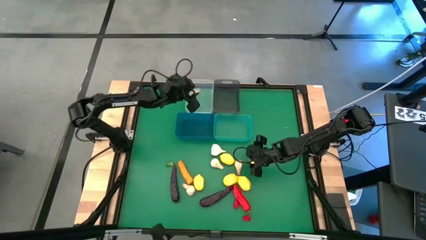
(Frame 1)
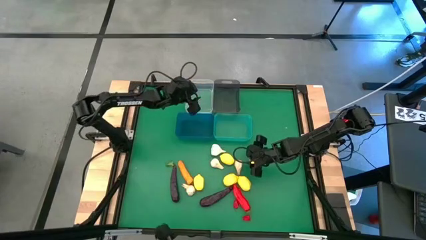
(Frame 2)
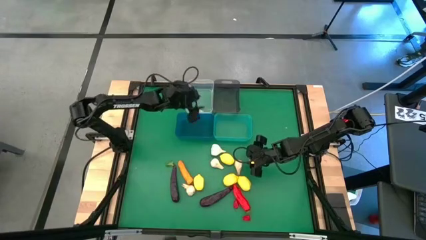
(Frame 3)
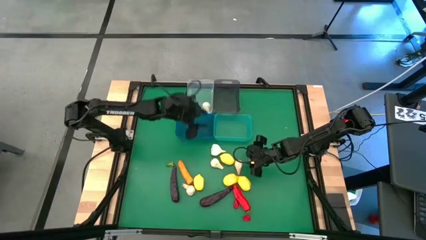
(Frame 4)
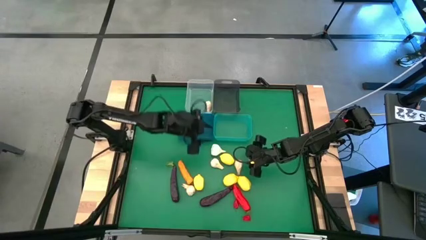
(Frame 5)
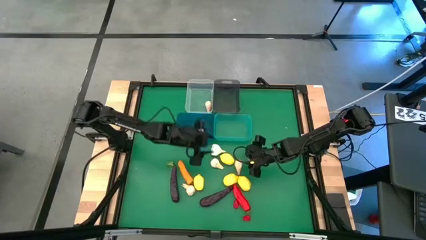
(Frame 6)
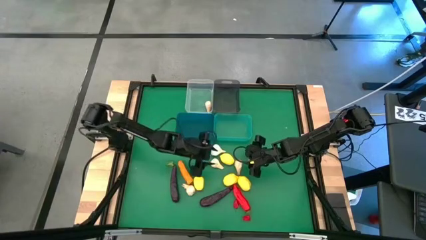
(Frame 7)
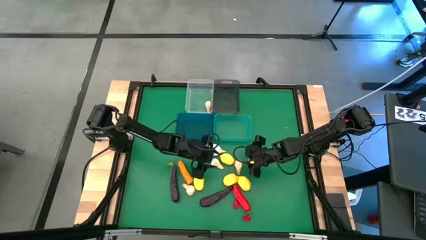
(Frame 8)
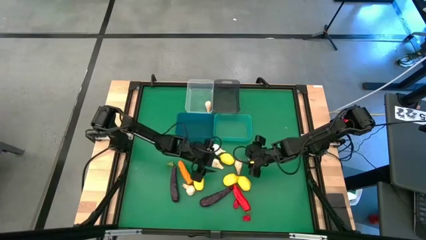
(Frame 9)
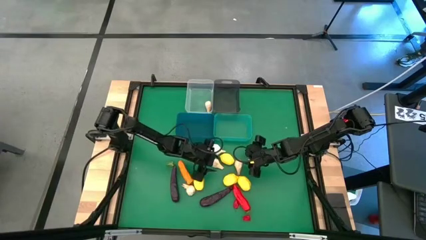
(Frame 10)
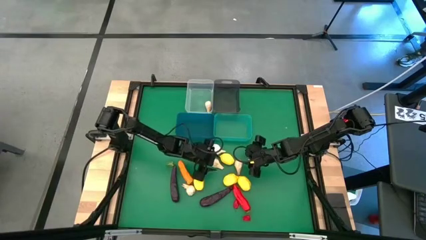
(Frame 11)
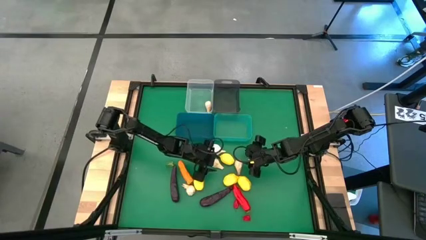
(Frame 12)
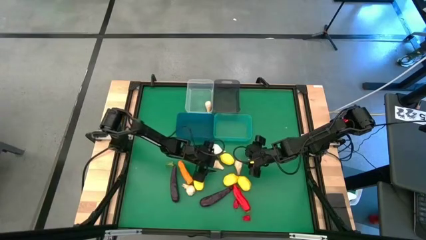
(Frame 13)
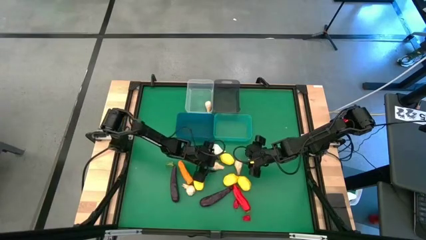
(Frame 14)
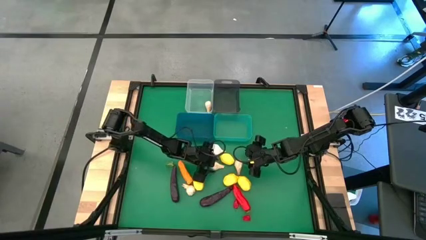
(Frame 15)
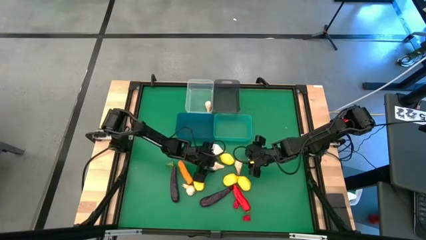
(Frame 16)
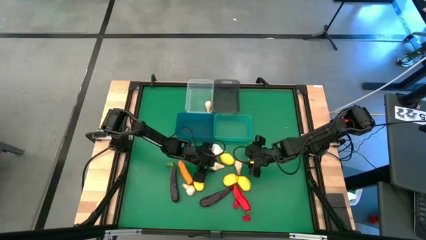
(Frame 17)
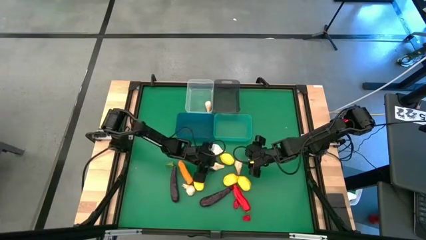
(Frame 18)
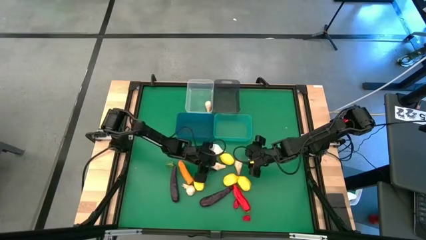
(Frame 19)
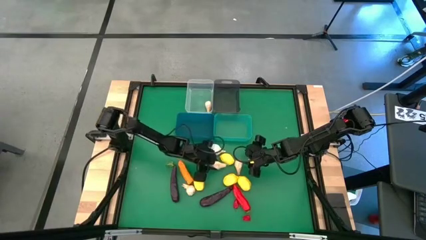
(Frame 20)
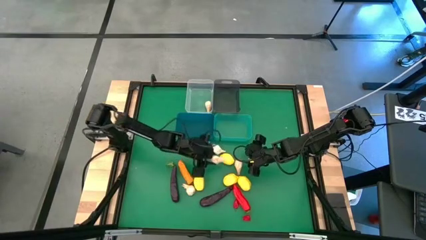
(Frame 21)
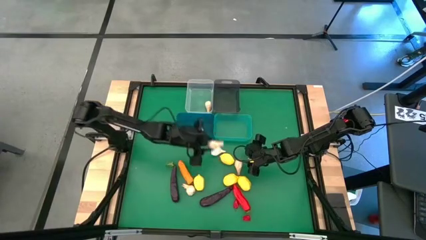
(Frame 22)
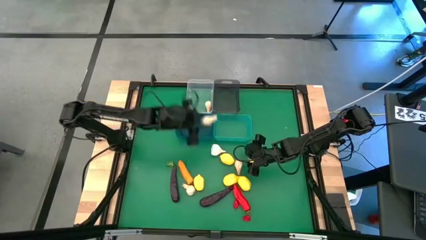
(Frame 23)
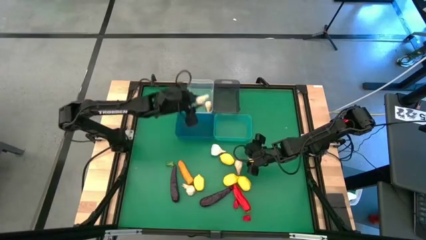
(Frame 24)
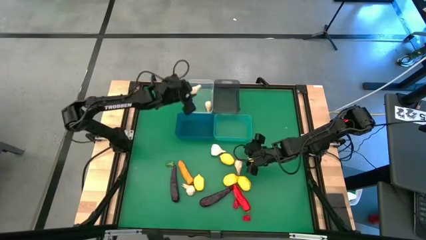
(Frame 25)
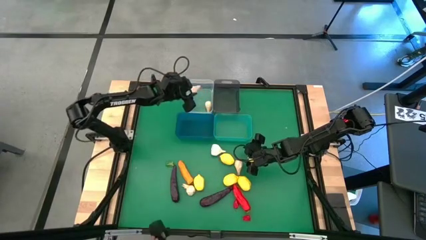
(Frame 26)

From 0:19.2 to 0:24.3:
Task: Sort produce into baskets
Put the white garlic into the transparent bin

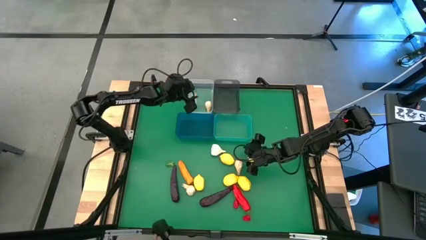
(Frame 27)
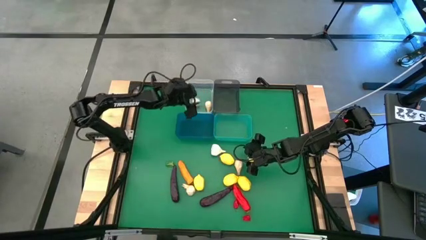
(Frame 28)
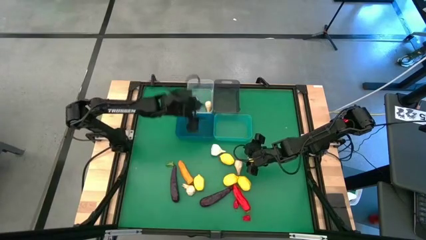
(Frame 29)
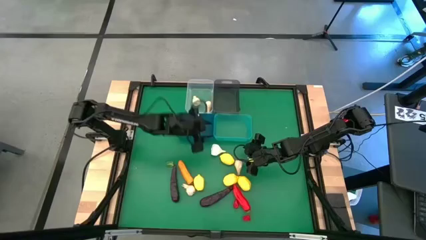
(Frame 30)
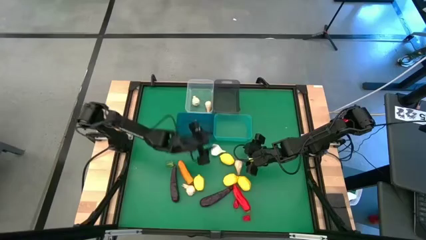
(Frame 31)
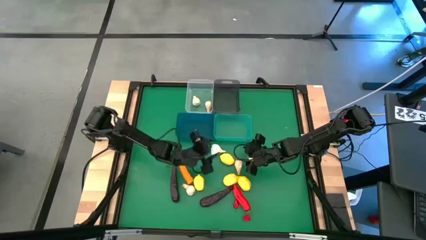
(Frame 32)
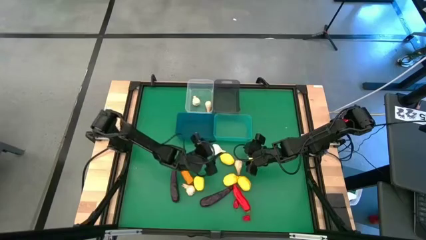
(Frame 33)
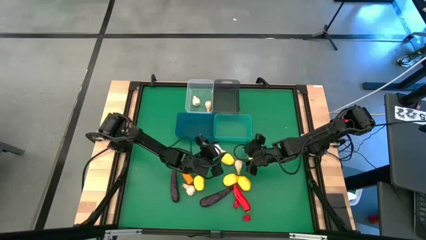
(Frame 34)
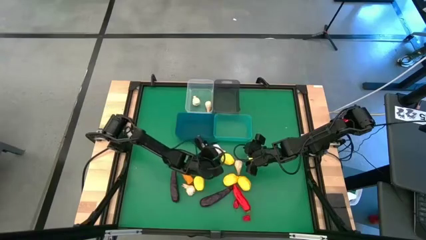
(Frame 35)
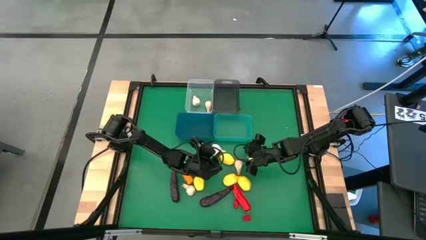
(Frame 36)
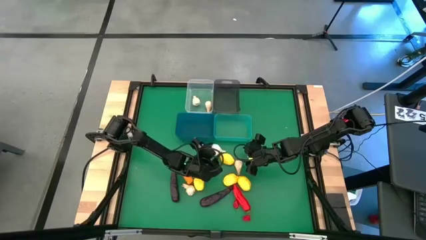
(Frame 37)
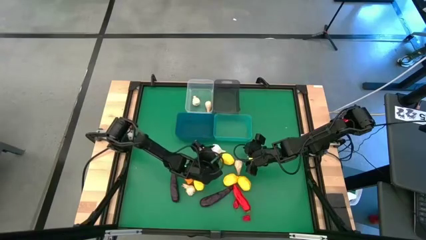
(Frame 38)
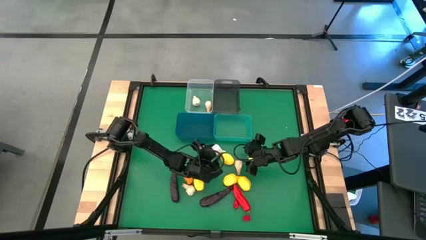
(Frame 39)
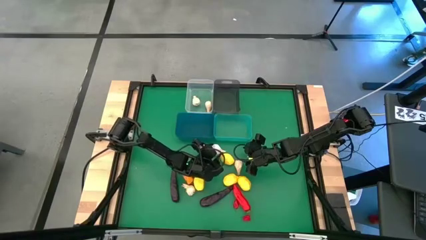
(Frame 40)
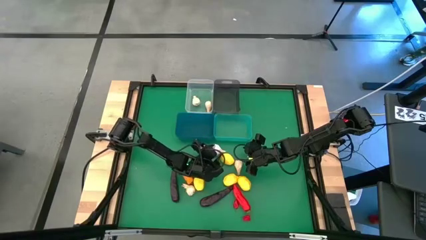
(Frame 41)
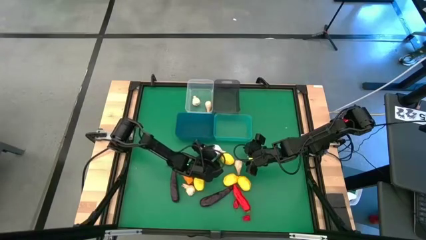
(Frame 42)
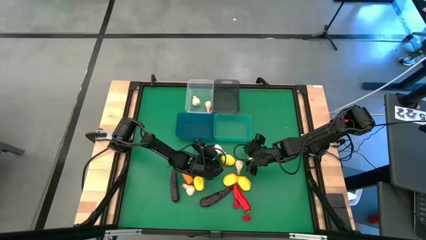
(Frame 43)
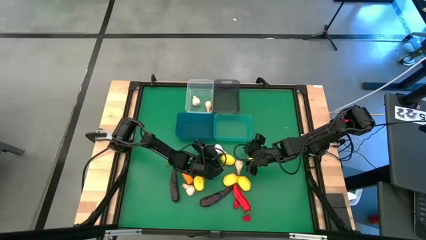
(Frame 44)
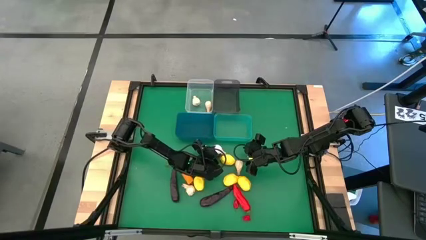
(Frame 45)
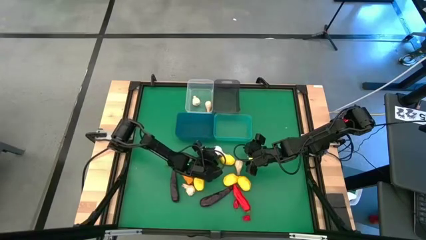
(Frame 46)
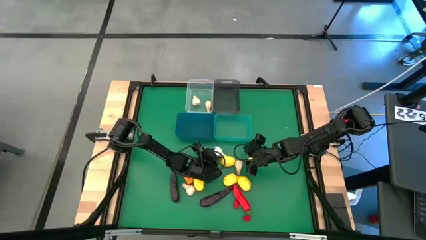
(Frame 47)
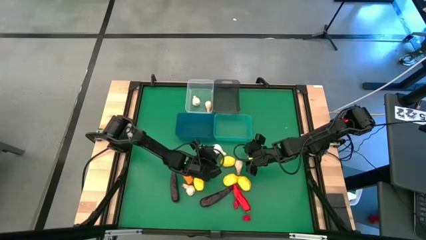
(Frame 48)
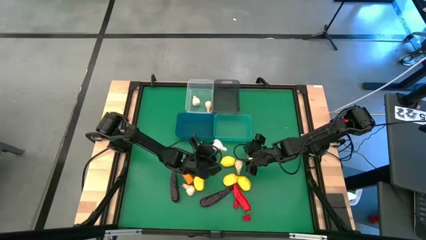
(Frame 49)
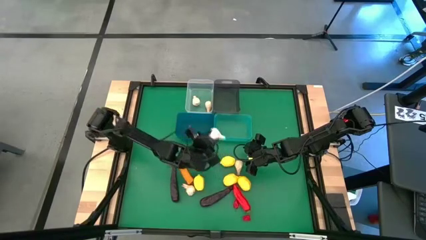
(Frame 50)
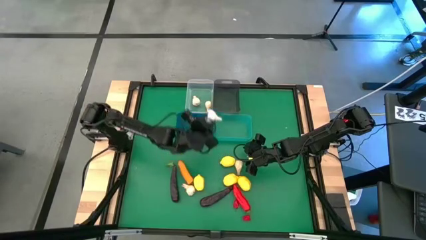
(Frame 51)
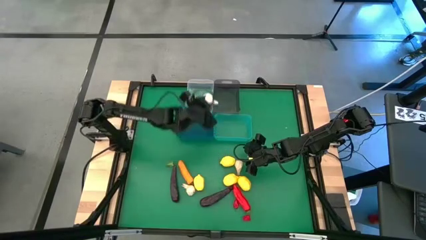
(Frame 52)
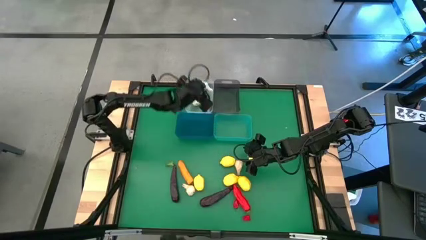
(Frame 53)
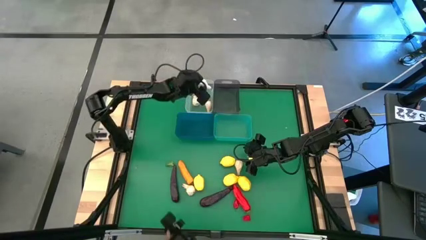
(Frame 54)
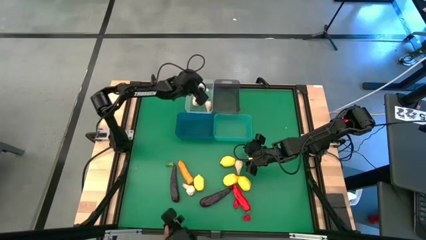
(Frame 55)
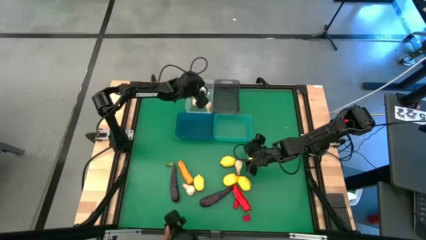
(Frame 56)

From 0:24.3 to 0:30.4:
Put the white garlic into the transparent bin

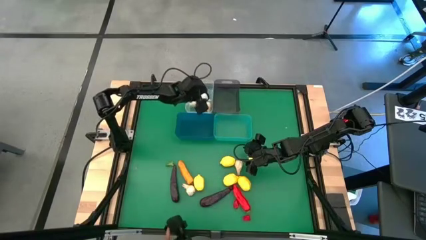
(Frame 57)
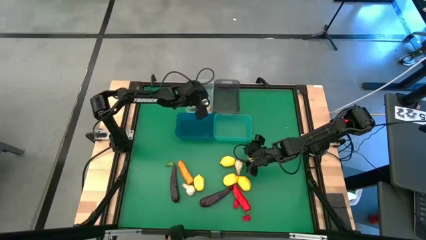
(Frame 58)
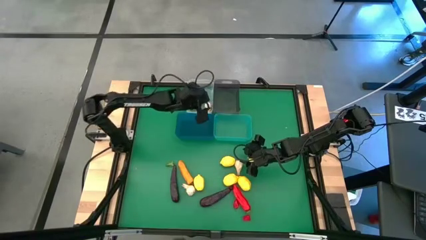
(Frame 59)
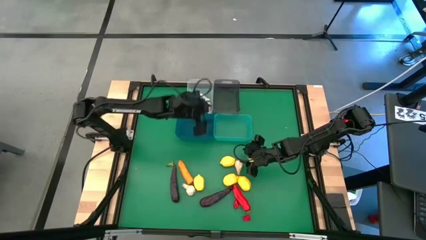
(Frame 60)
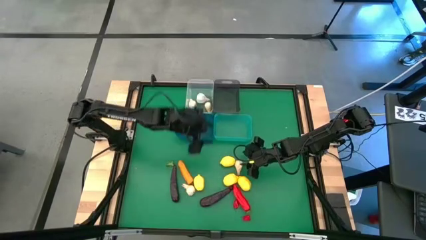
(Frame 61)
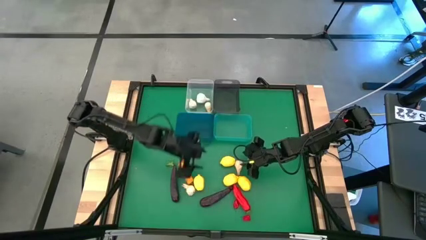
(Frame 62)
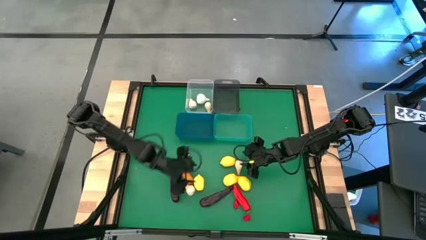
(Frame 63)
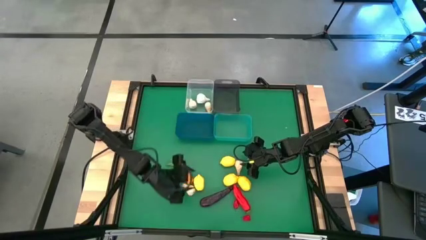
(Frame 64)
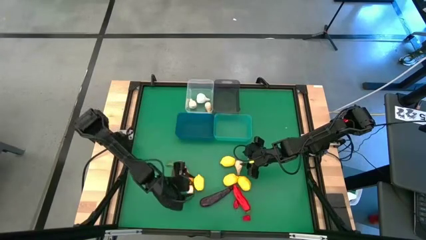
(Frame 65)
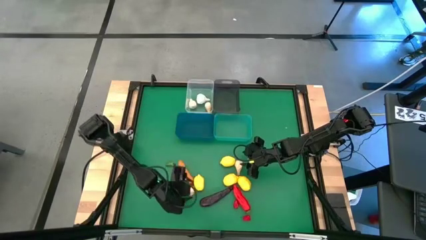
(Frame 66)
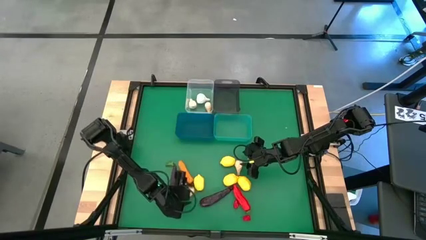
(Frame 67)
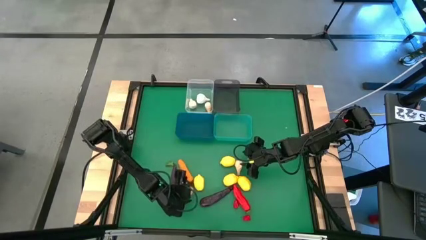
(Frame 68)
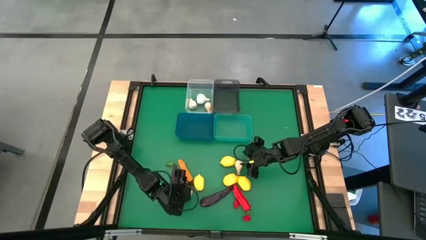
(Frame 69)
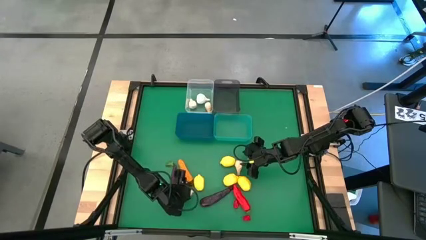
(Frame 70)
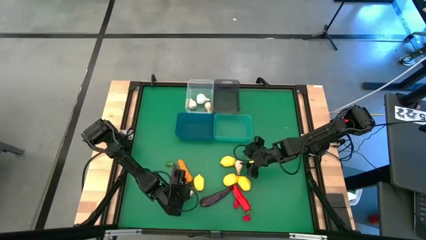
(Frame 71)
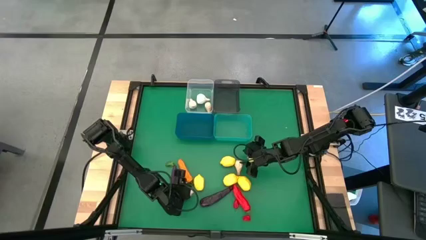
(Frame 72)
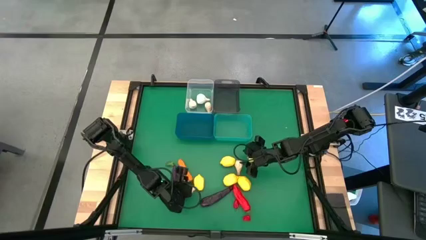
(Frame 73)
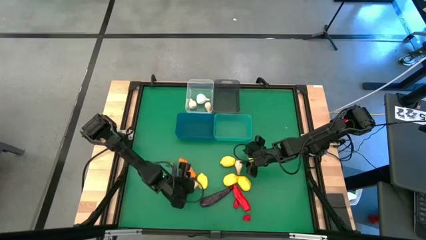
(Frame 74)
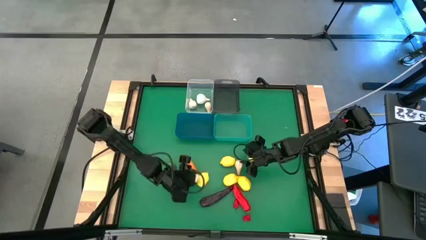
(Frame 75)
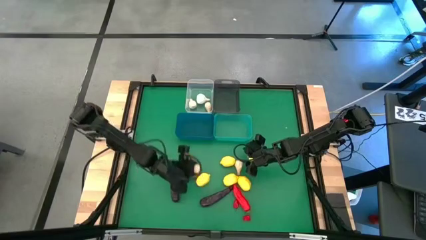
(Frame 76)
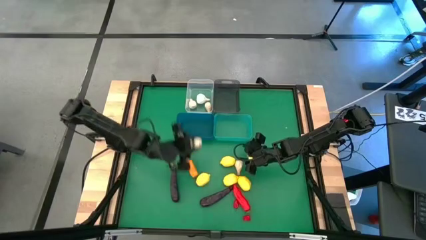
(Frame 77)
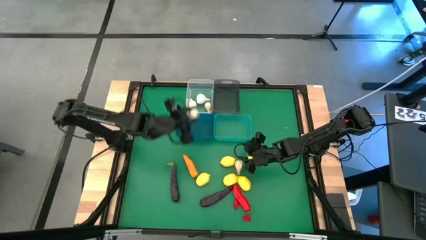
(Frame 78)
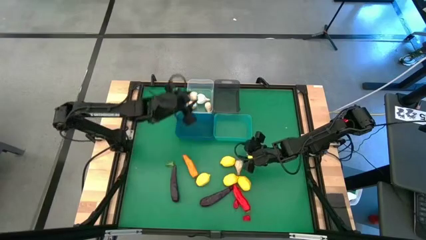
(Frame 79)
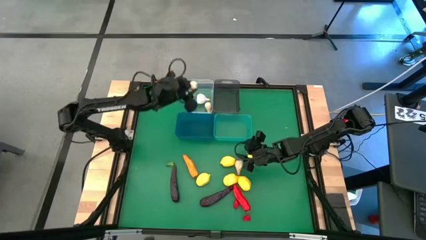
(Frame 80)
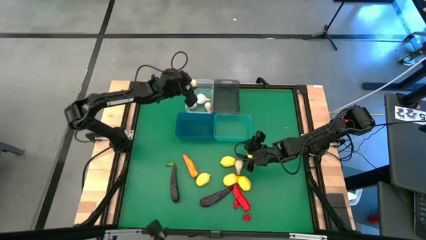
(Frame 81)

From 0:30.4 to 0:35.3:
Put the white garlic into the transparent bin

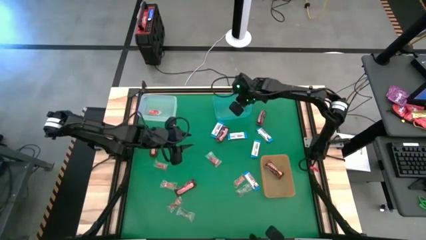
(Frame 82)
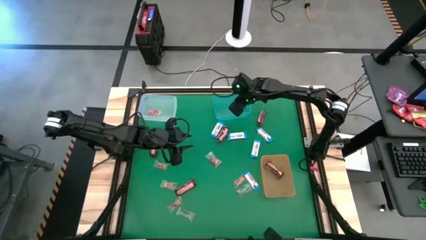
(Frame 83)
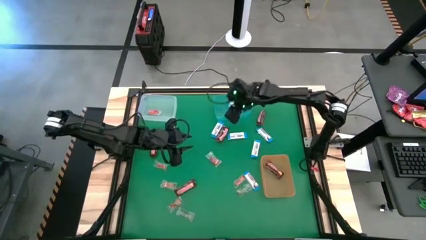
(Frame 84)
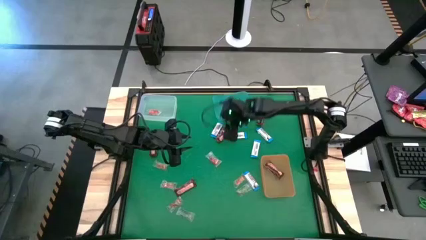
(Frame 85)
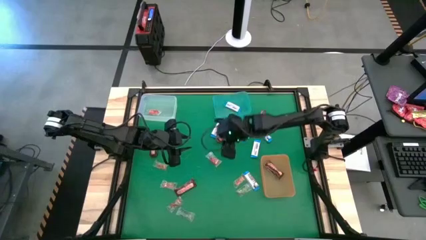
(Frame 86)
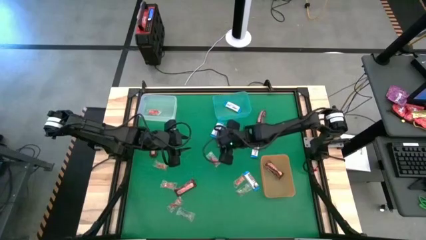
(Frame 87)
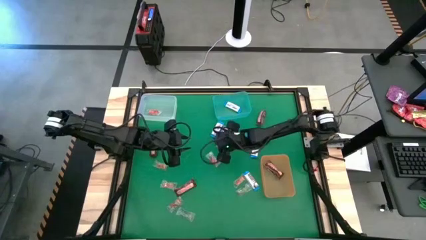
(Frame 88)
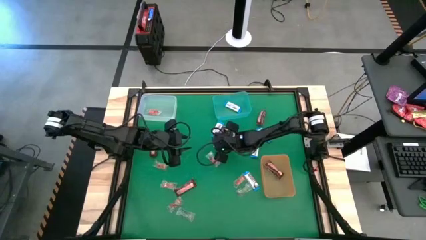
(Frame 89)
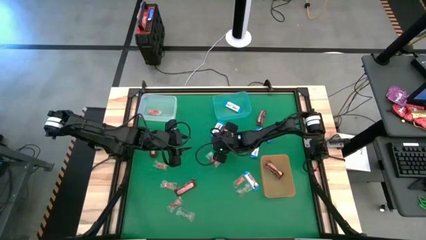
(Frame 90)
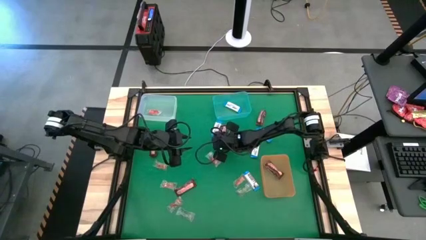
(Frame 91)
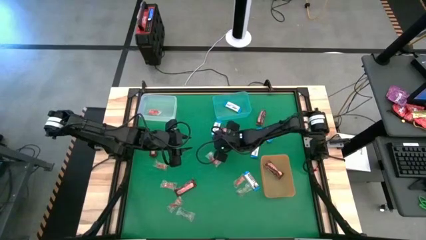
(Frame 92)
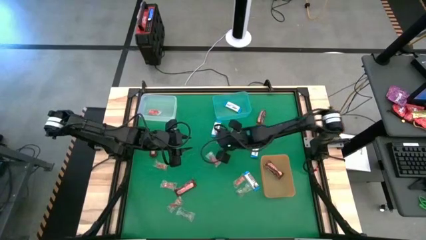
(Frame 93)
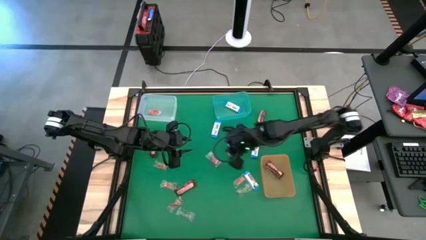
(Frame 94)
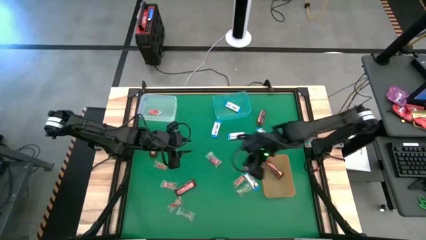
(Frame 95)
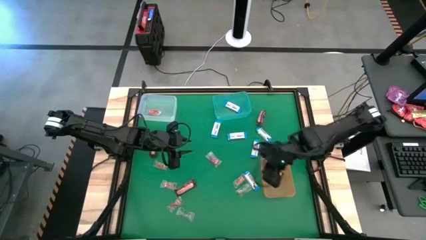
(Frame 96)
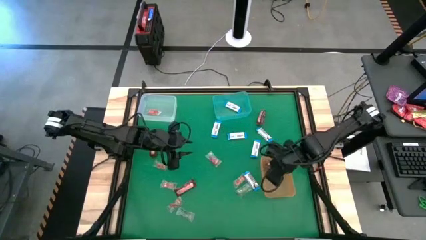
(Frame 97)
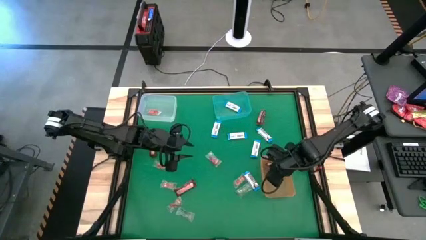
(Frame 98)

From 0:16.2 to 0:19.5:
Task: Sort candy by brand, put in halloween buckets
Put the brown chocolate into the orange bin
